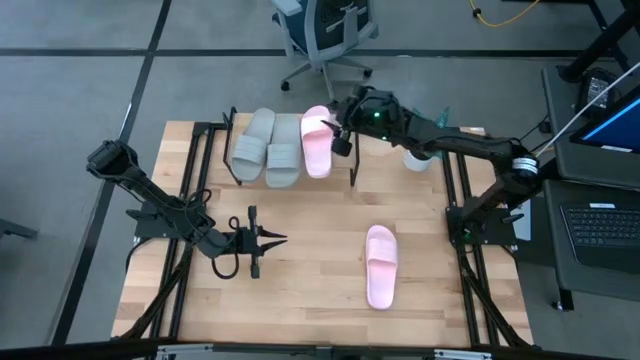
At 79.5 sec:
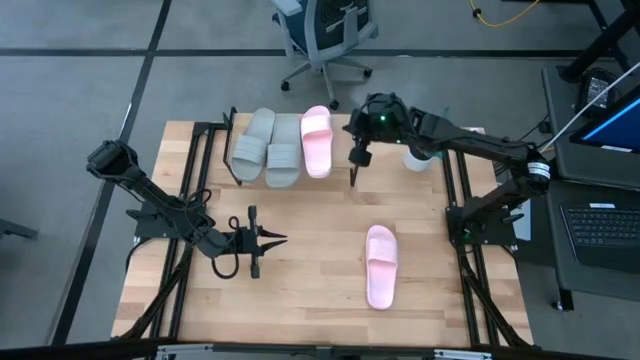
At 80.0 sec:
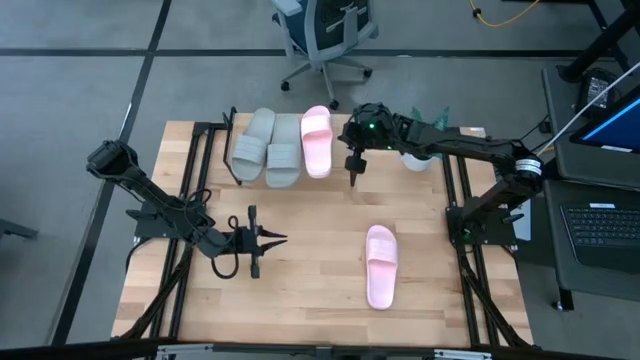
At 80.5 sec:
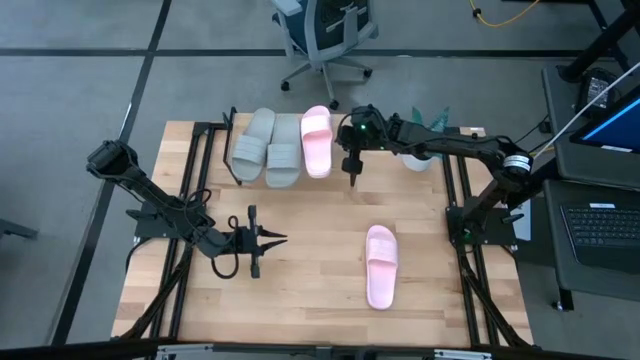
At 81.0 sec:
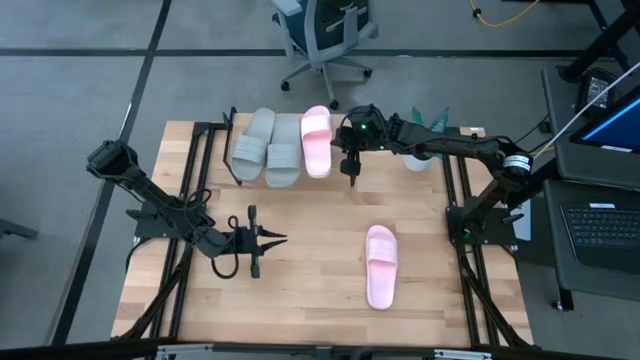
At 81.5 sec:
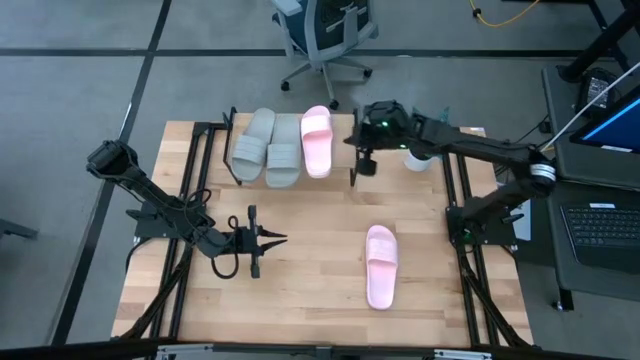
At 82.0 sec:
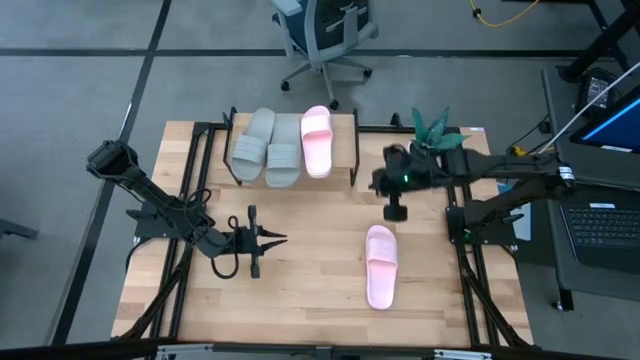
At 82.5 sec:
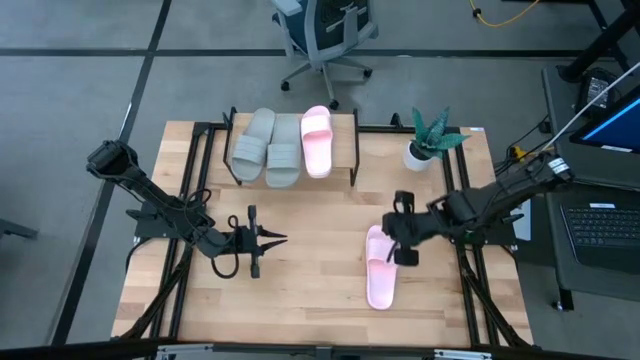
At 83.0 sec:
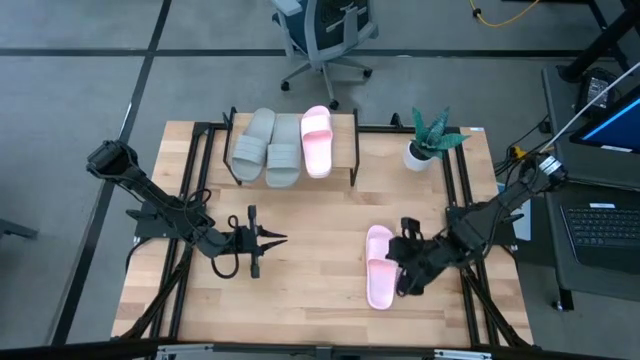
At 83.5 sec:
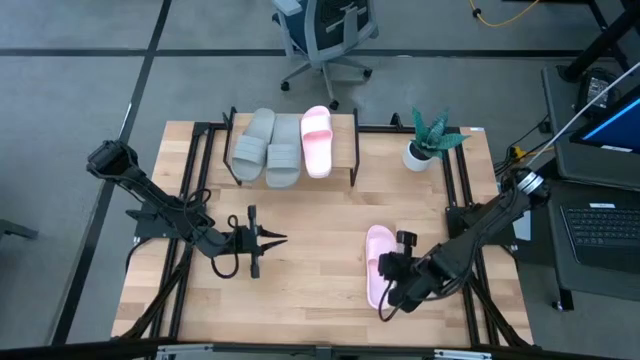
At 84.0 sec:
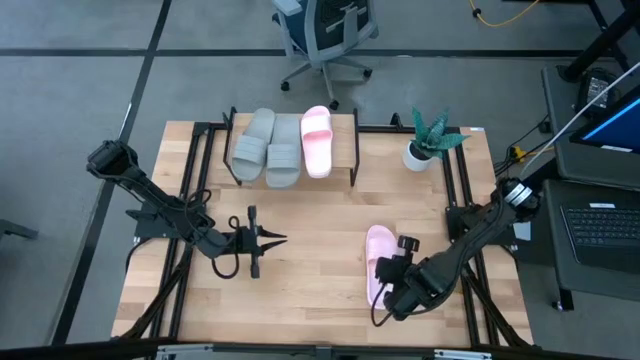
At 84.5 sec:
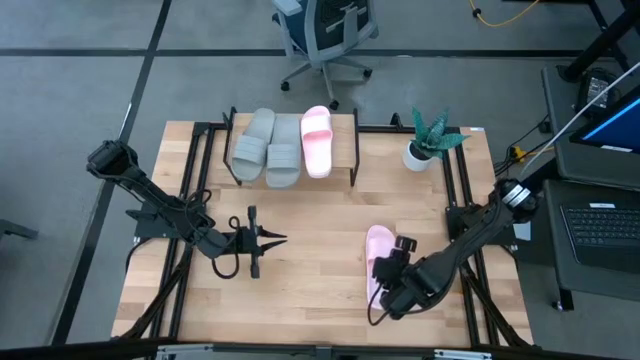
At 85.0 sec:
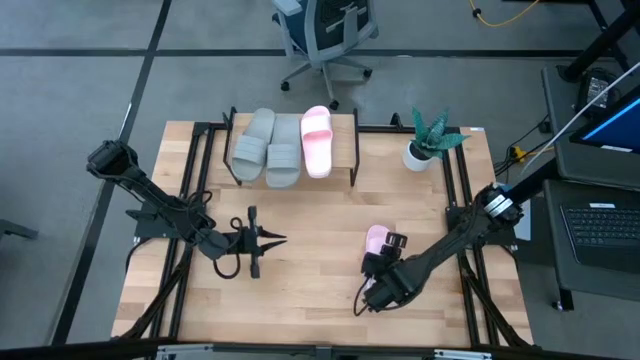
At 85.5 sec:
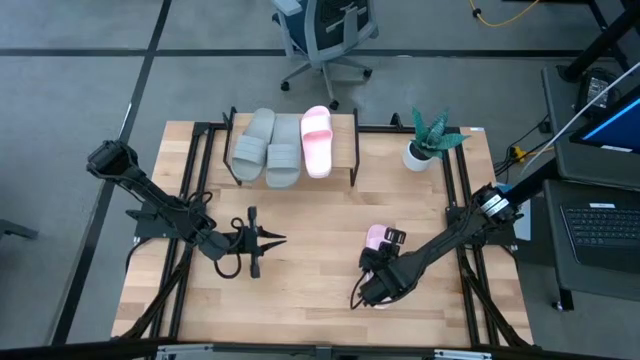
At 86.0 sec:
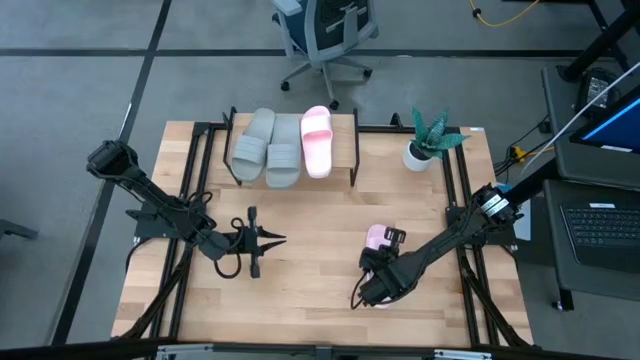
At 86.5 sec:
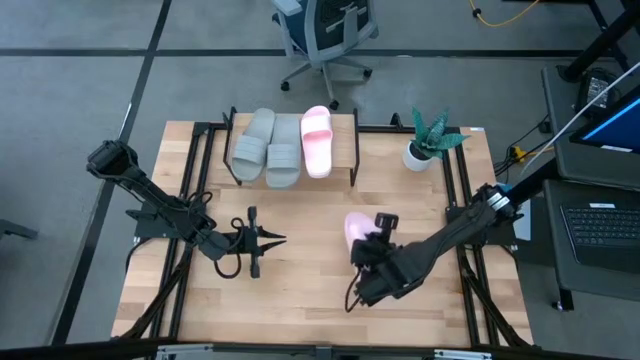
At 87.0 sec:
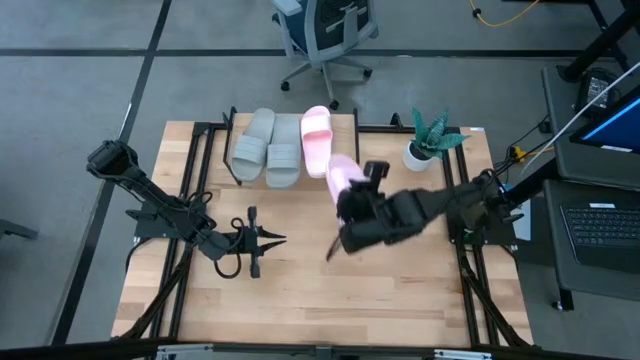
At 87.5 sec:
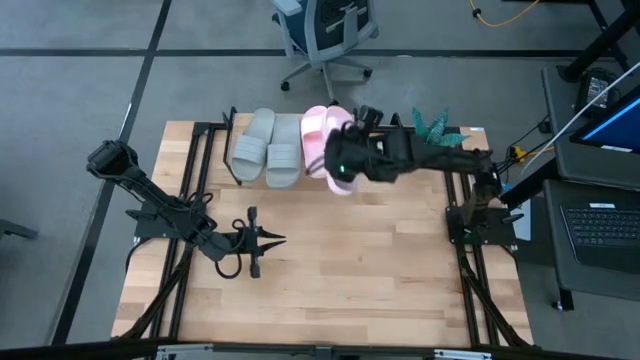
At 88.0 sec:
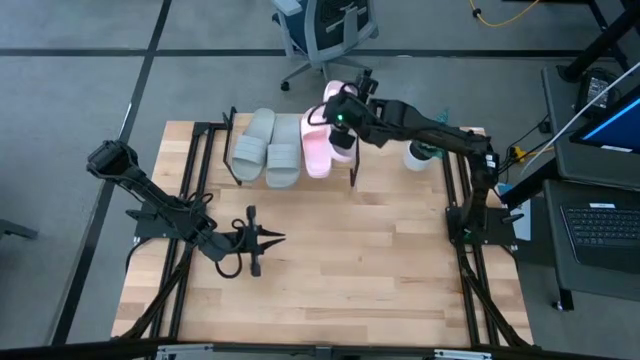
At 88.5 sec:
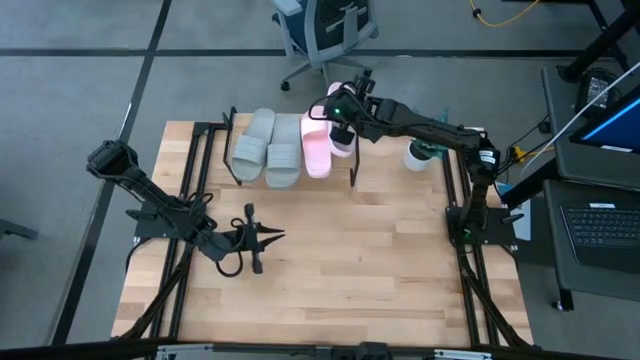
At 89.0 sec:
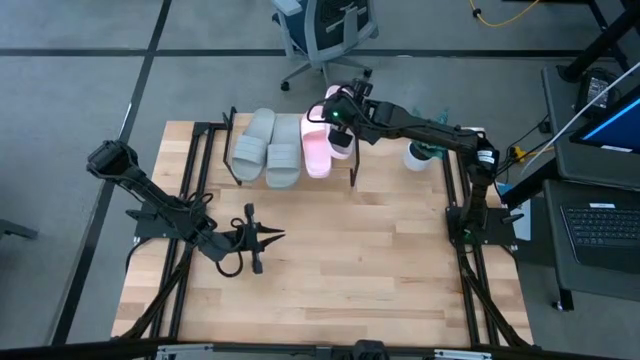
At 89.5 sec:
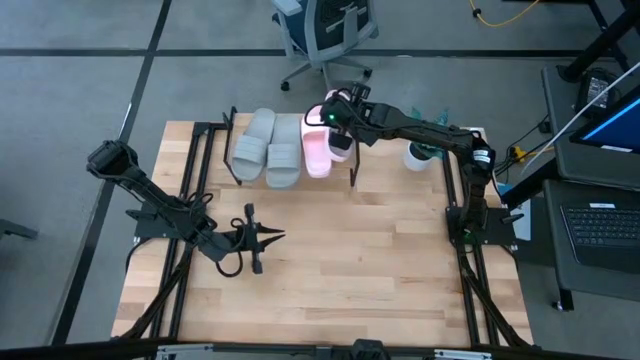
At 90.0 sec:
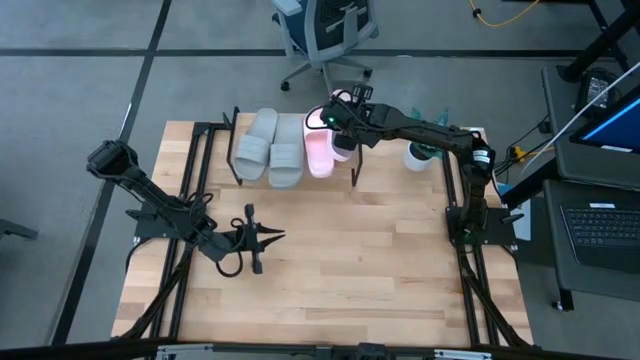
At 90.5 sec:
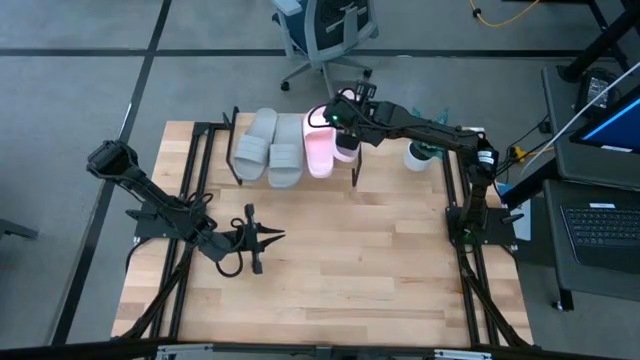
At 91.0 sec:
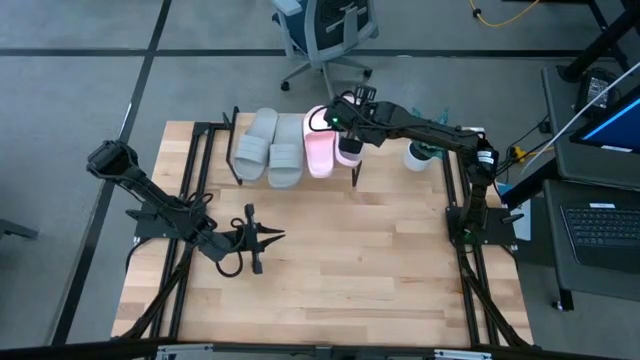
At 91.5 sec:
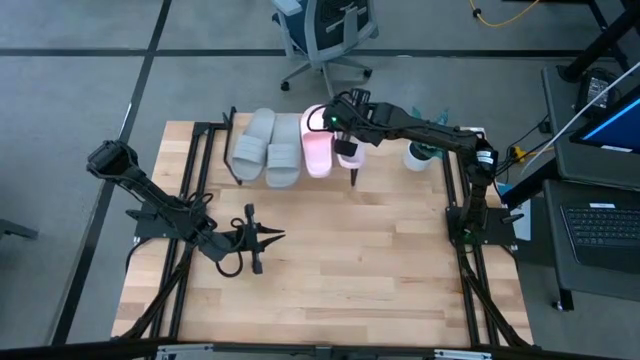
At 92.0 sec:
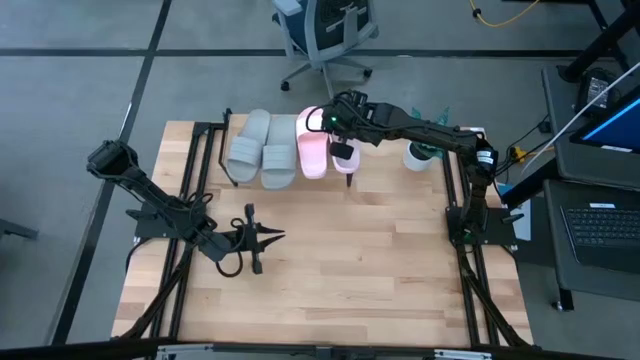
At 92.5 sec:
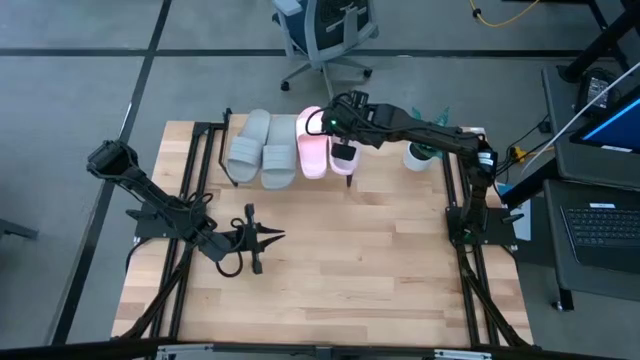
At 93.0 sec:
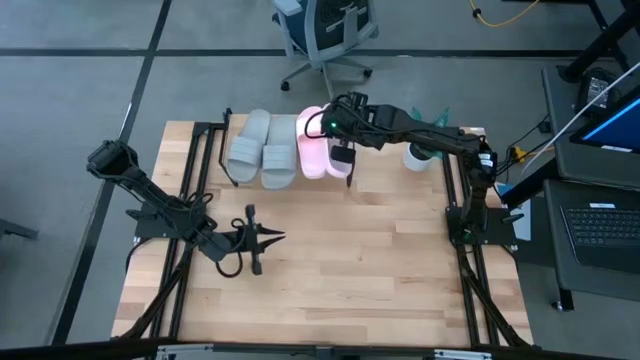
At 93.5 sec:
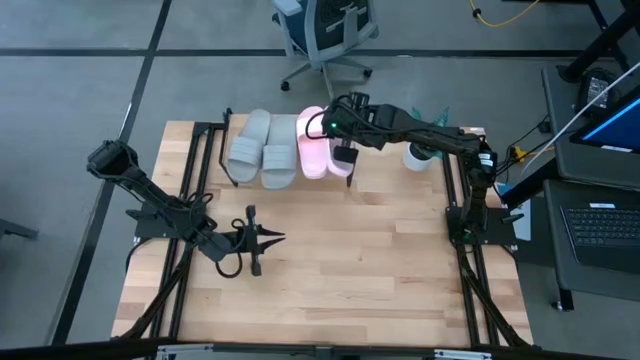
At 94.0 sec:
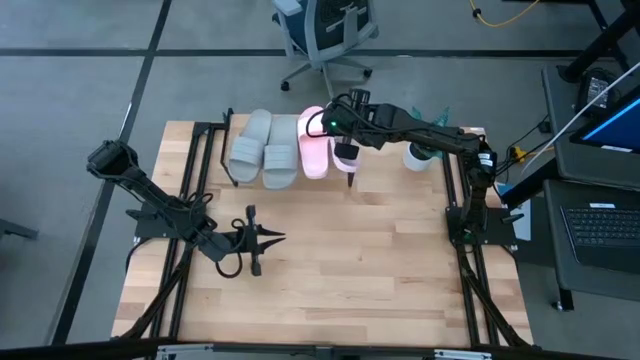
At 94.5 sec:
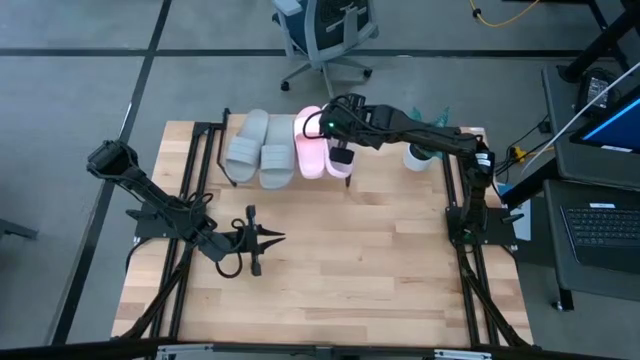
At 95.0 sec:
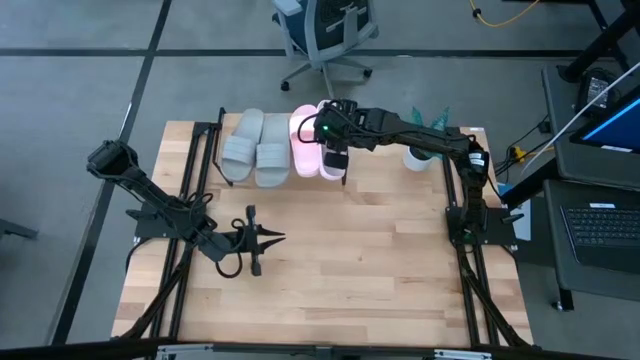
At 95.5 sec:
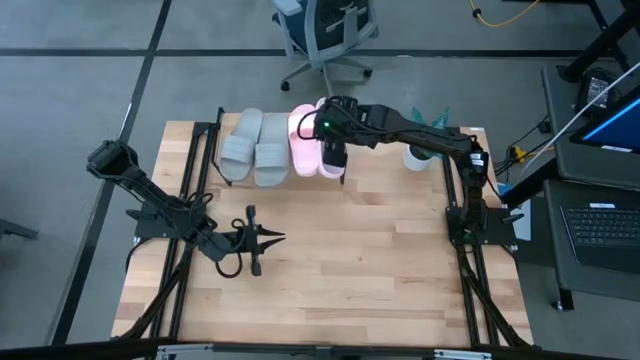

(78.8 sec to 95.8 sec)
Task: Pick and place slides into the shelf
Put the pink slipper on the shelf

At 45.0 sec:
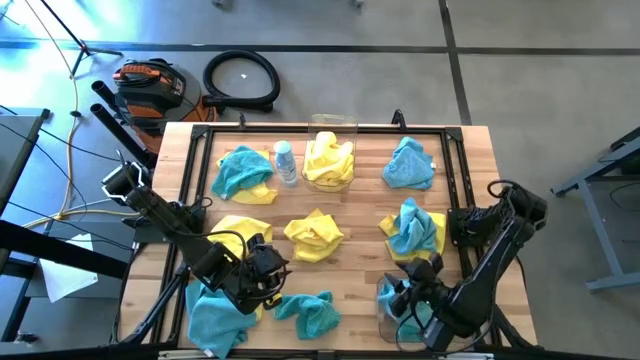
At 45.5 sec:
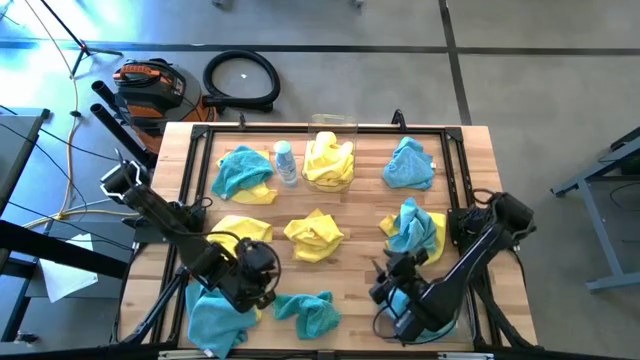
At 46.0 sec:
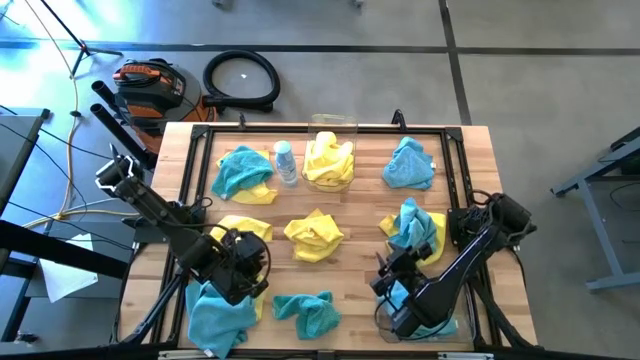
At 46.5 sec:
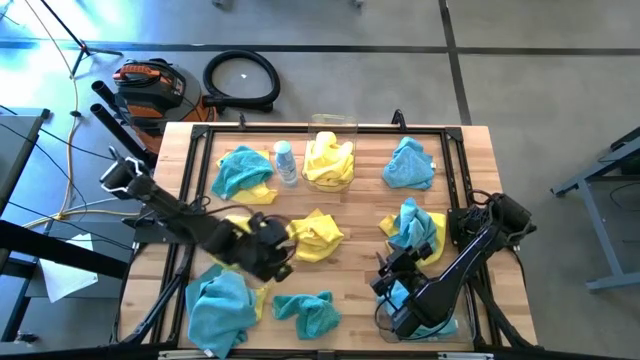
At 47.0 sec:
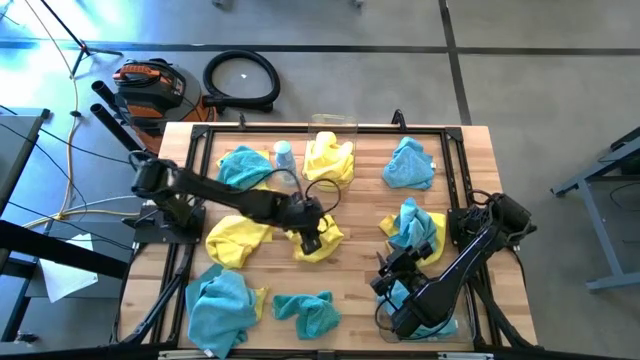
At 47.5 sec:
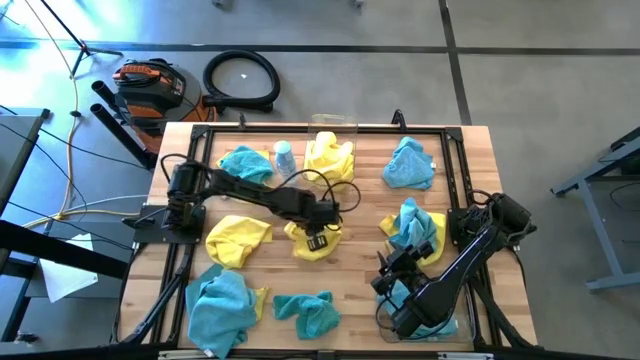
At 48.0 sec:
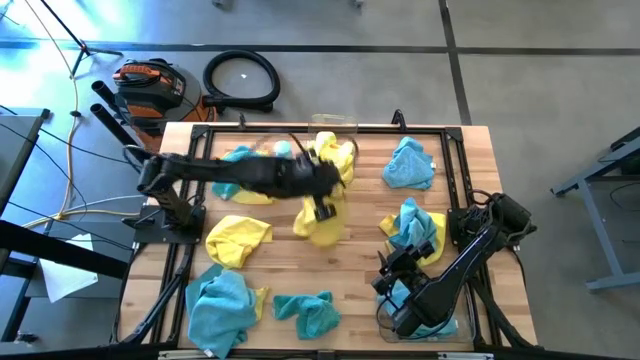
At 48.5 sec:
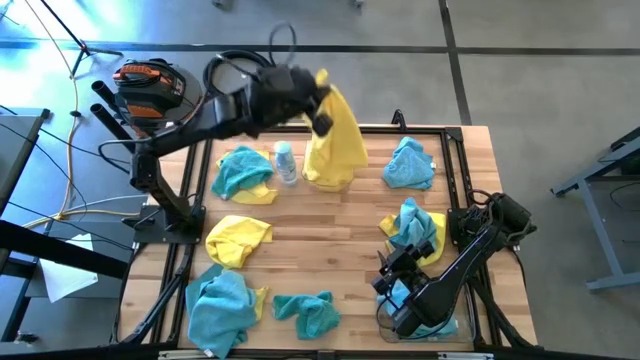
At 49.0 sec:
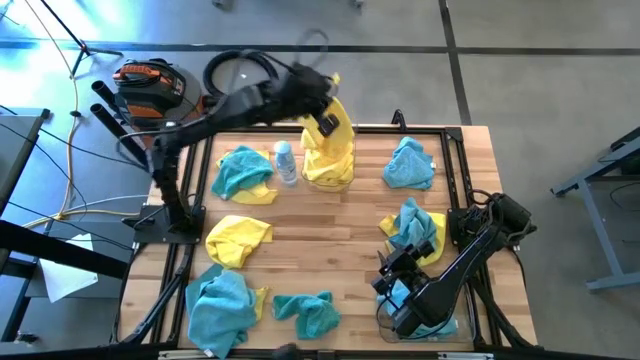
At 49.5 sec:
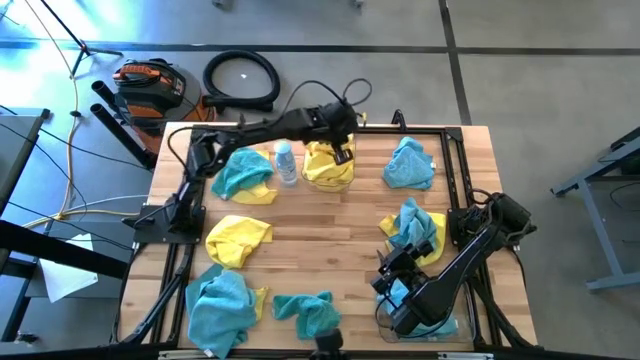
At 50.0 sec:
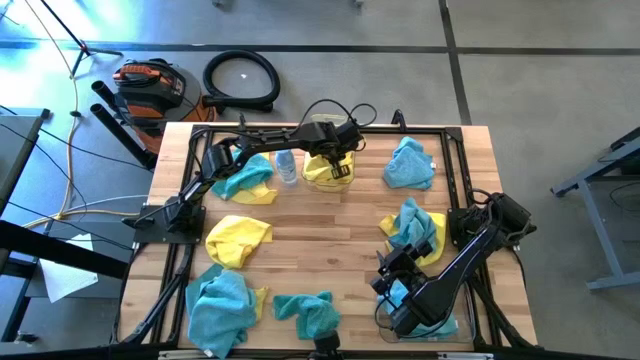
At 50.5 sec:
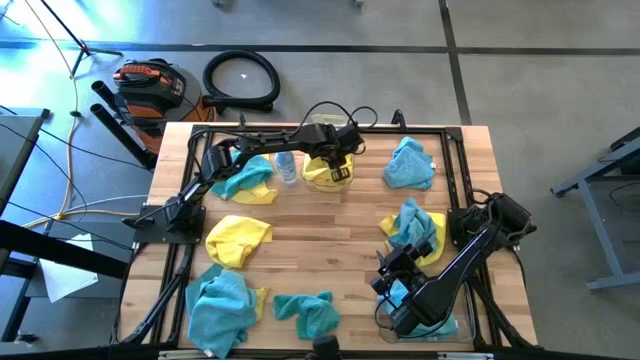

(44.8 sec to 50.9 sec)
Task: Sort microfiber towel by color & place in baskets
Put the yellow towel into the top transparent bin
